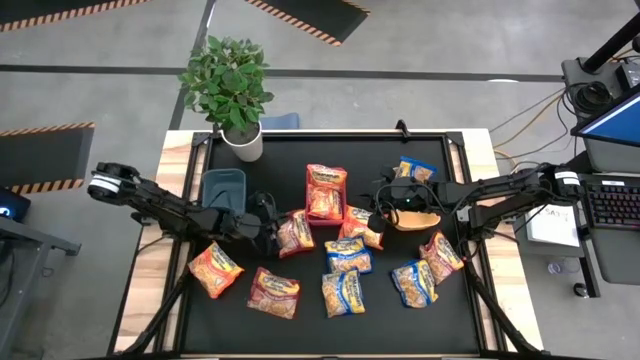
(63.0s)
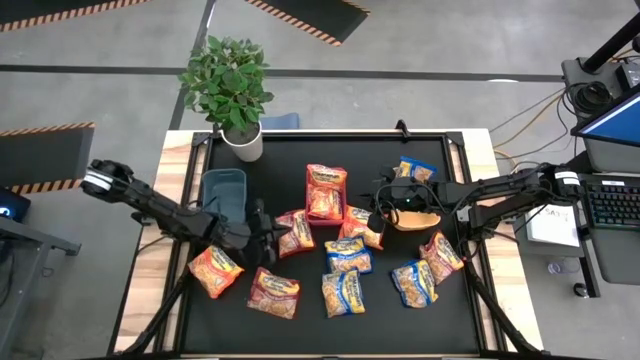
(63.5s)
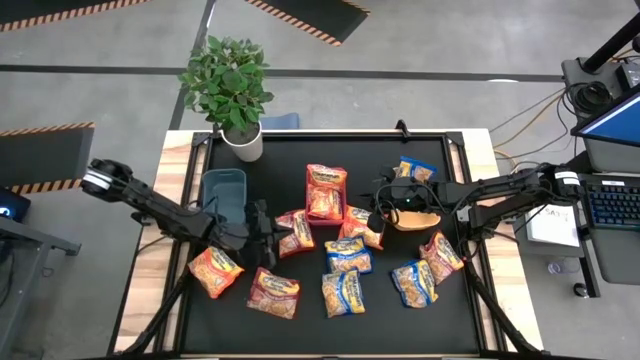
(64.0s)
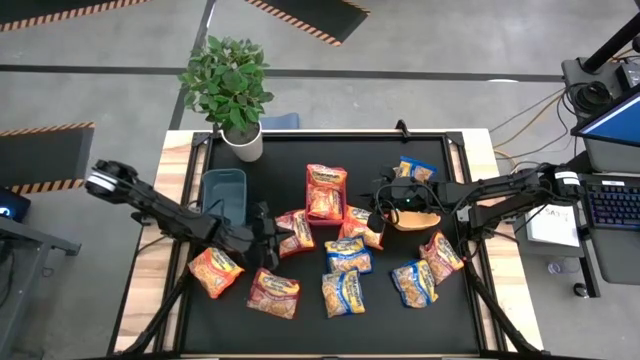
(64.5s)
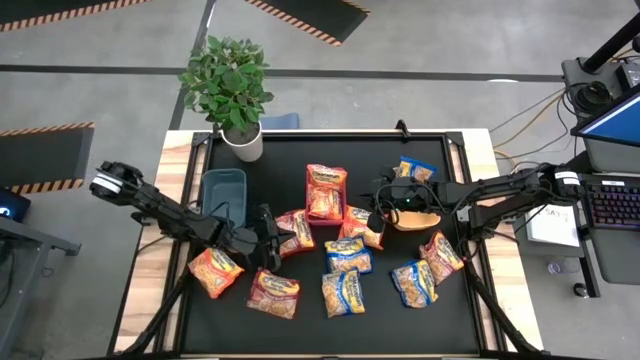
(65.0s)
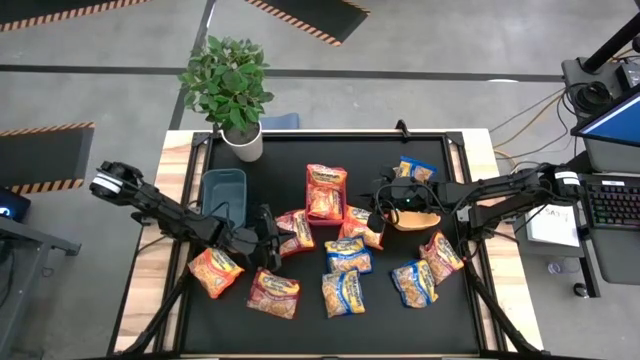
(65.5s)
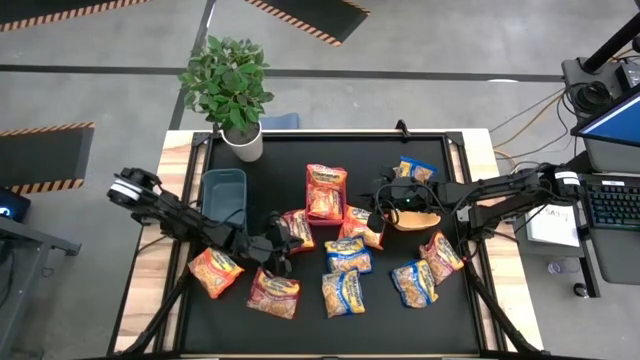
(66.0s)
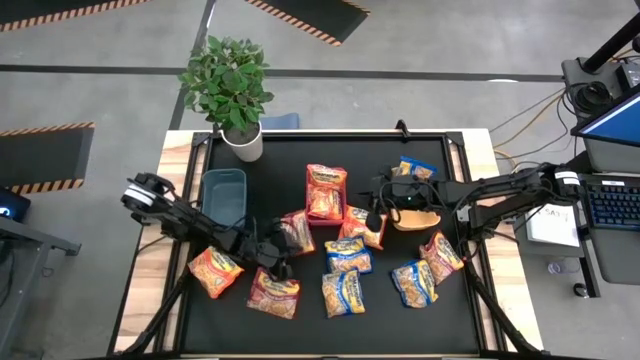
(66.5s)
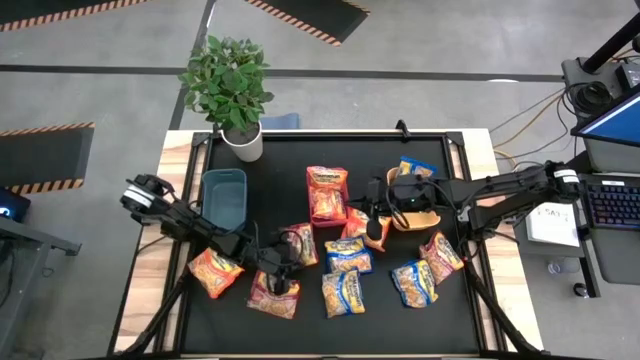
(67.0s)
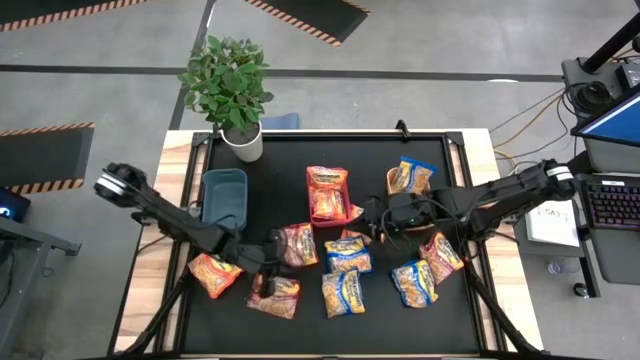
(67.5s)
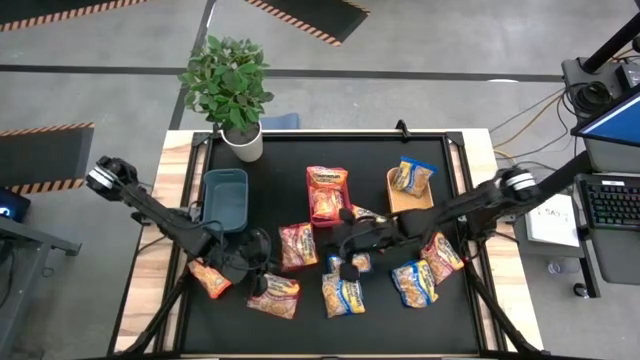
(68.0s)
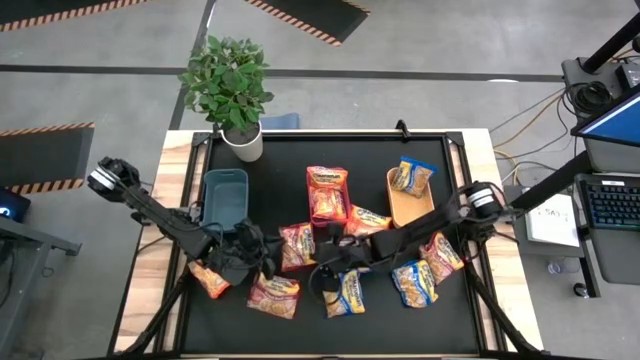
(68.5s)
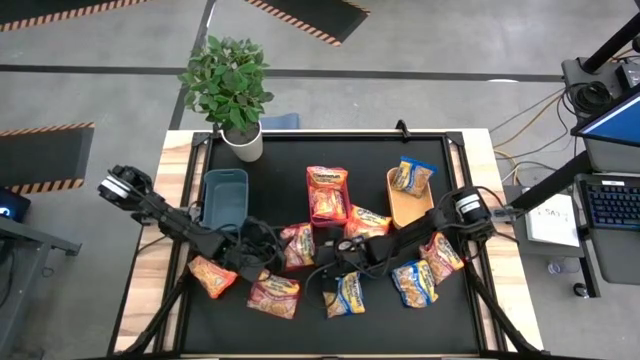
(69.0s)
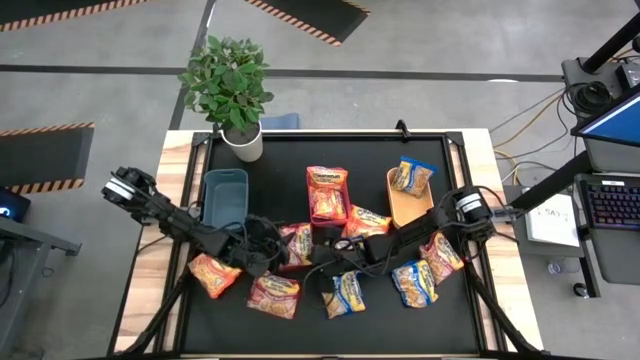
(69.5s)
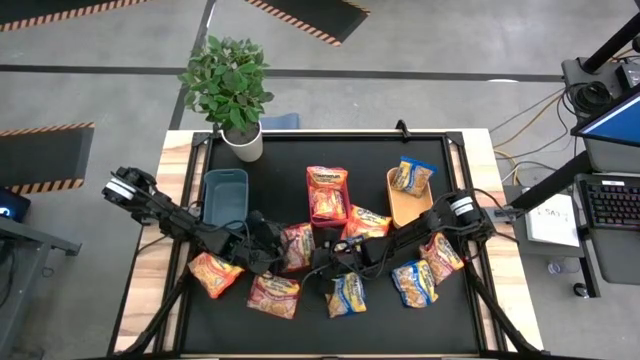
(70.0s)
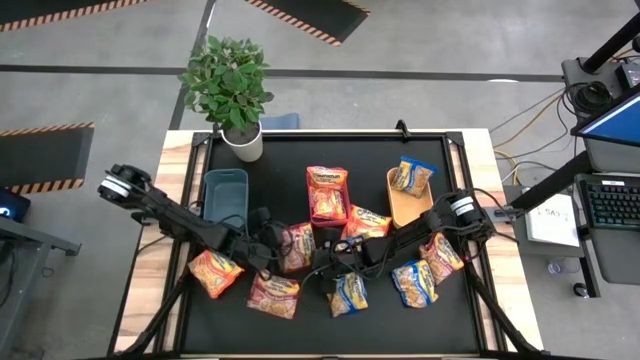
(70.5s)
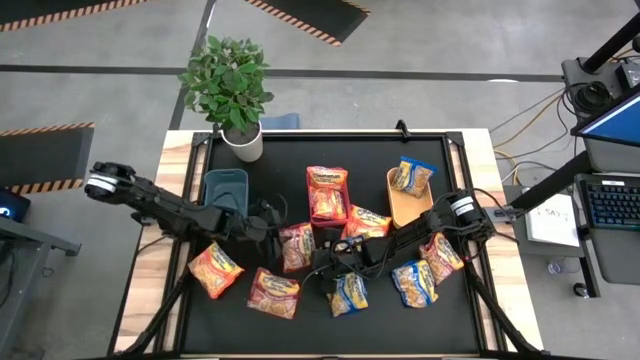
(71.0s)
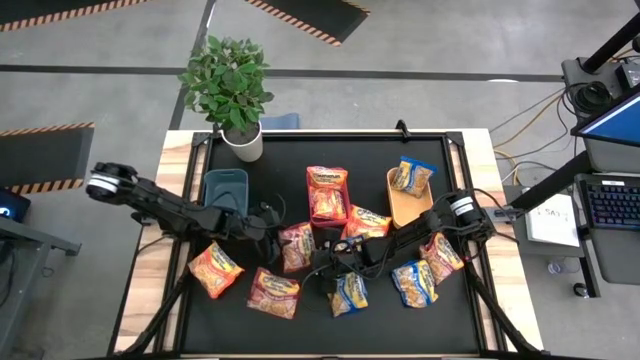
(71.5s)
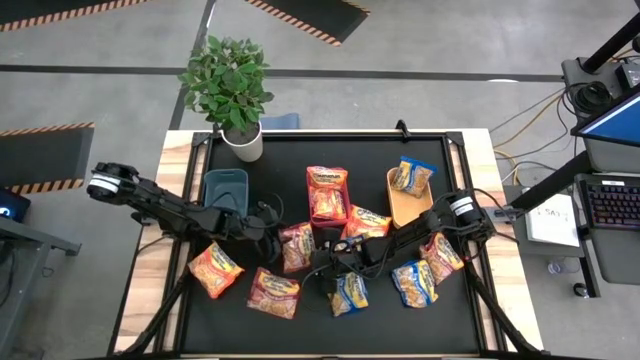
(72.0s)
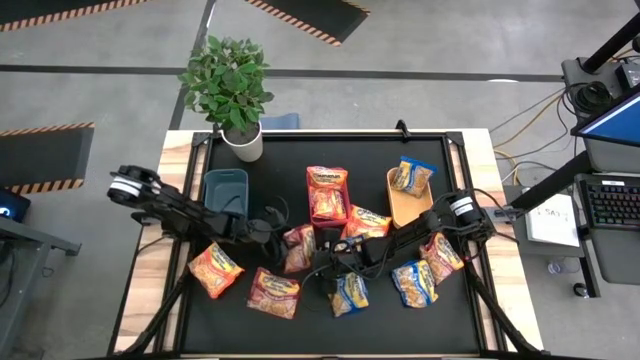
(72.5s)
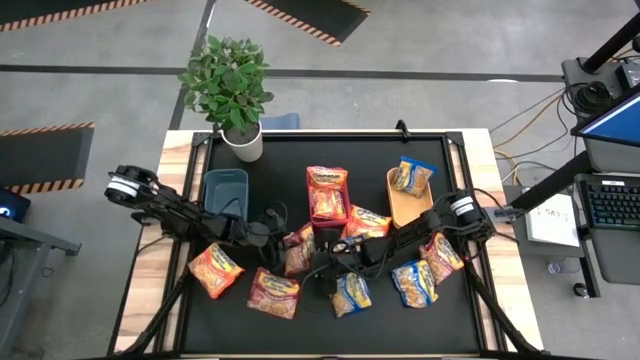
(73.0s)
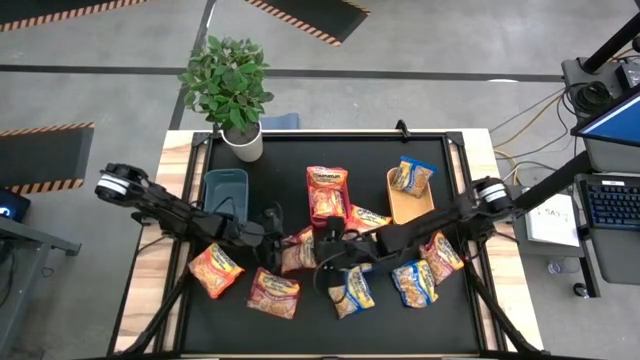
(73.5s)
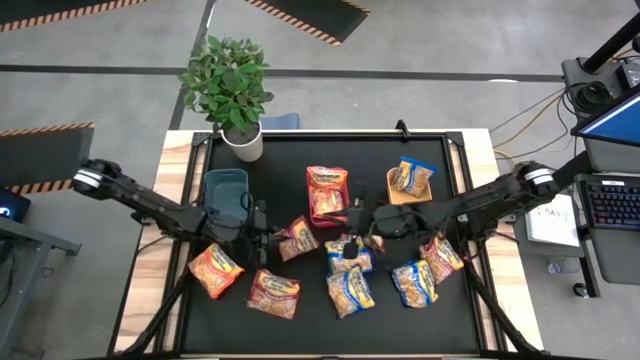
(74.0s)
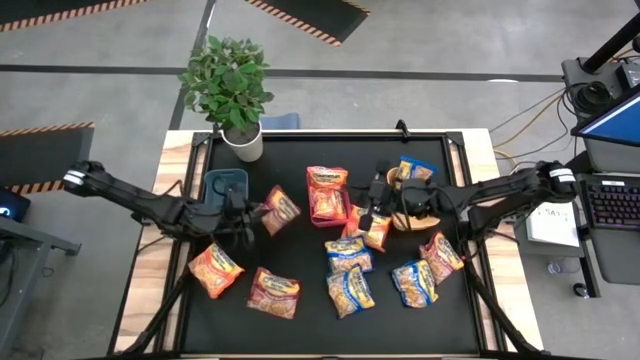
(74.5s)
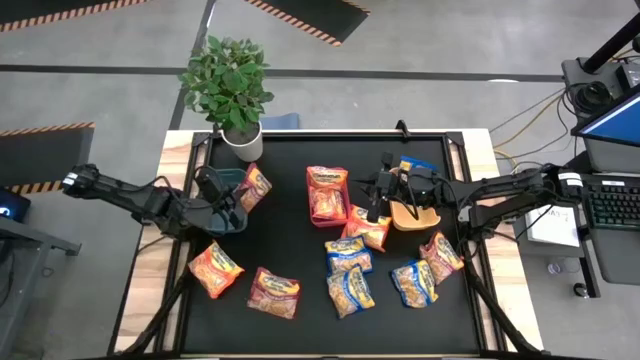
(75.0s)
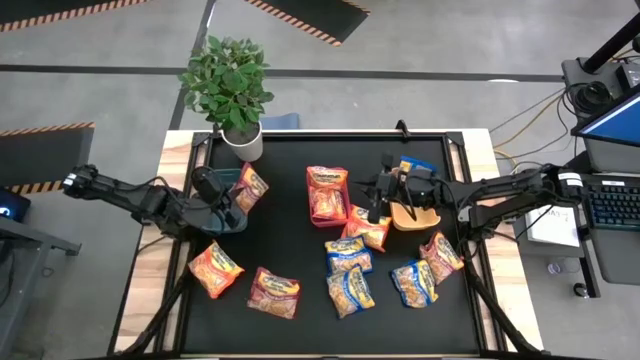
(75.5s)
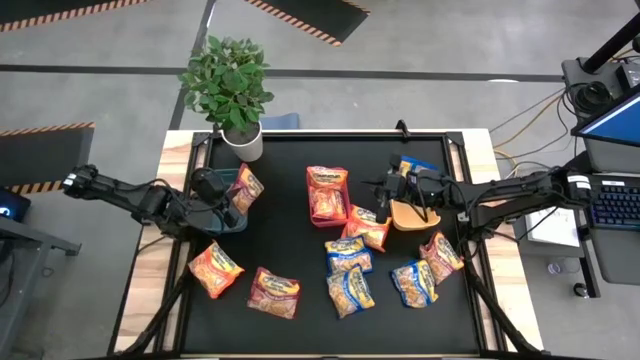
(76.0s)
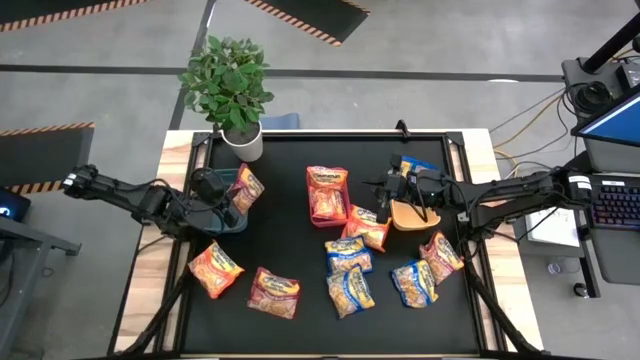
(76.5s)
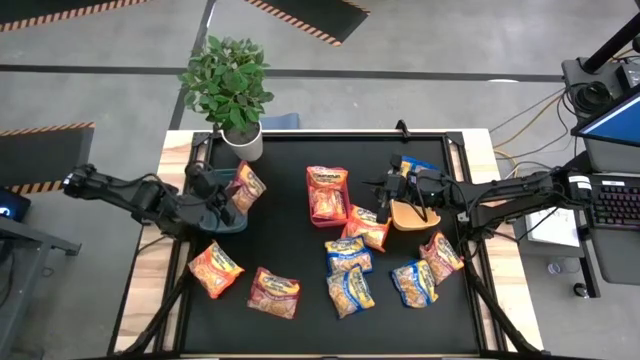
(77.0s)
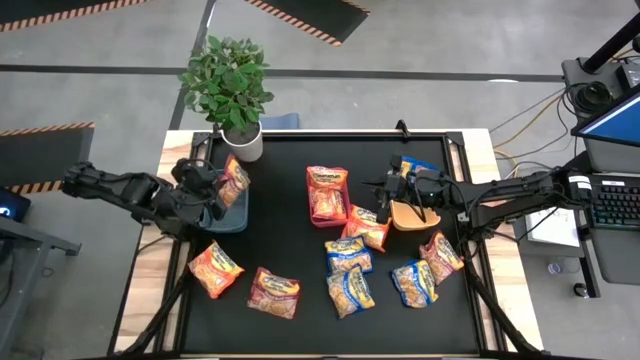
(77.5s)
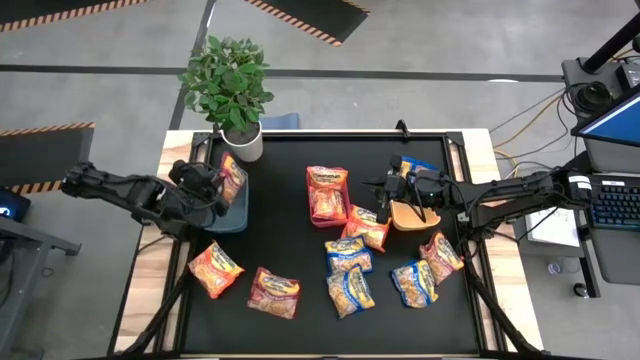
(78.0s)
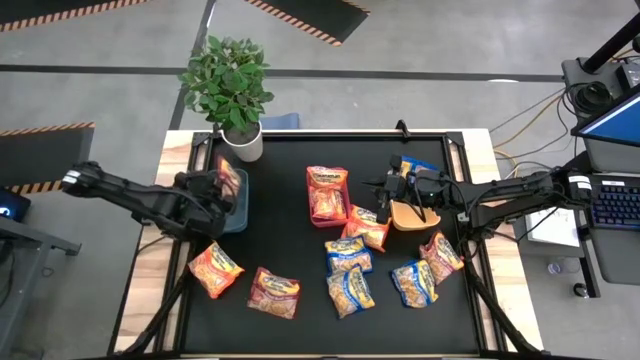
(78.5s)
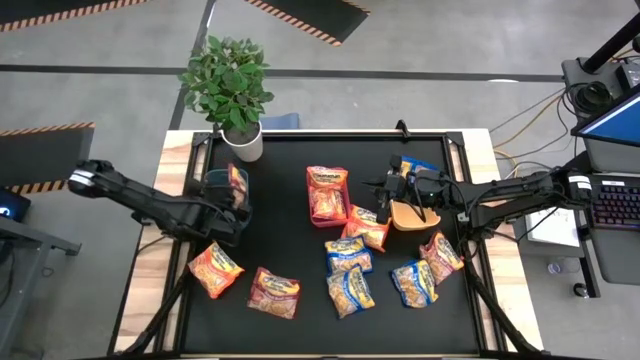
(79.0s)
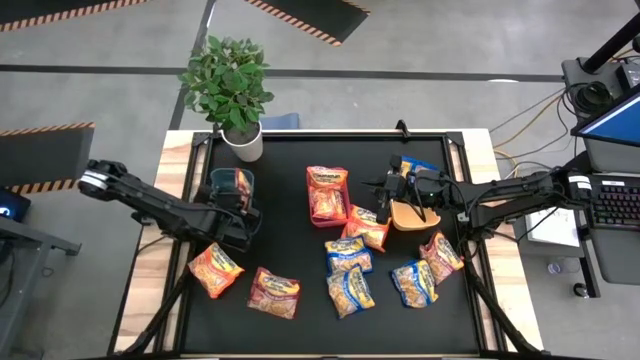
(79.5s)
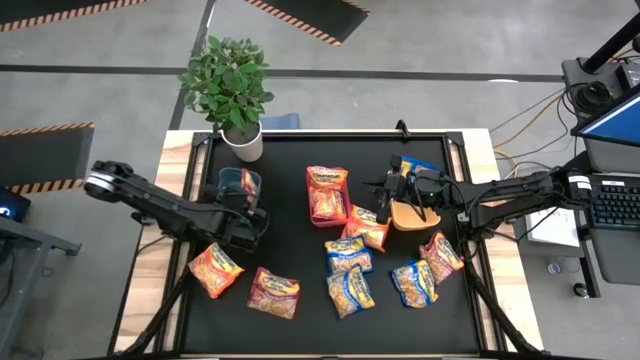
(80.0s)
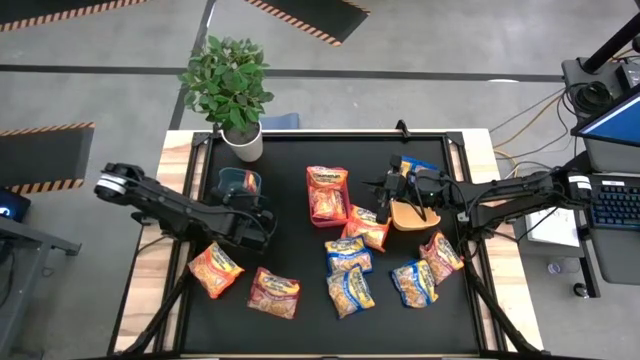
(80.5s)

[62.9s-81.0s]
Task: Sort Maruchan noodles
Put the red noodle pack into the blue bin

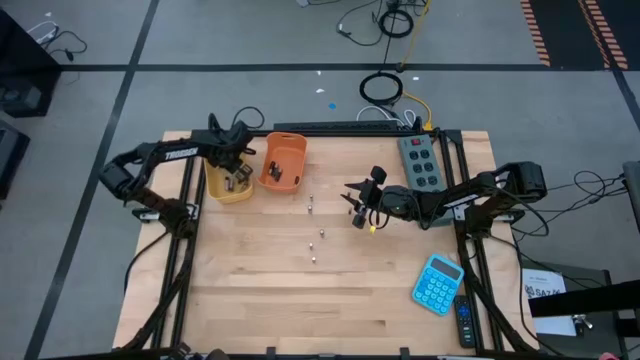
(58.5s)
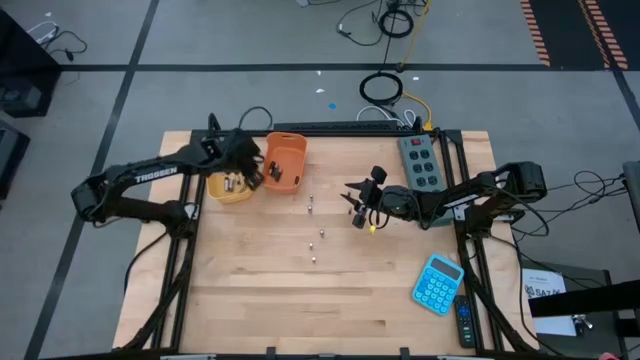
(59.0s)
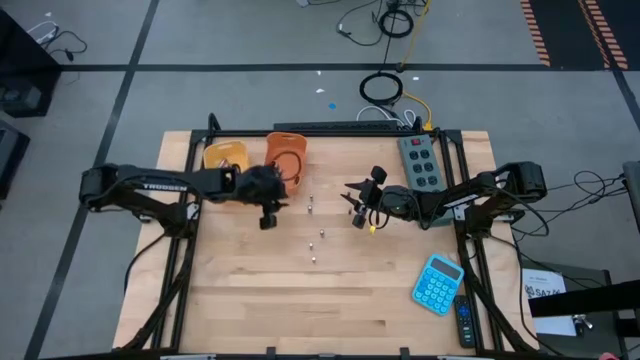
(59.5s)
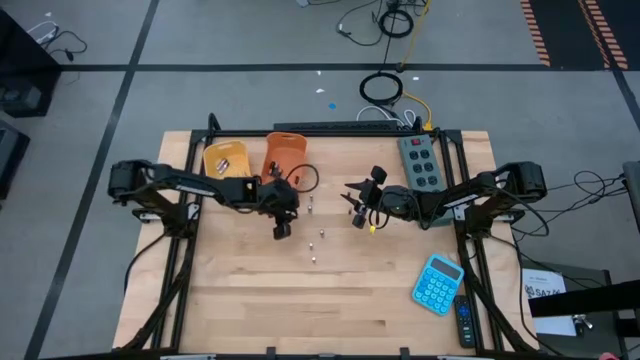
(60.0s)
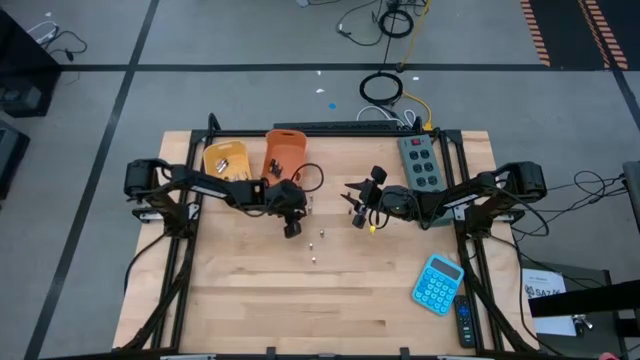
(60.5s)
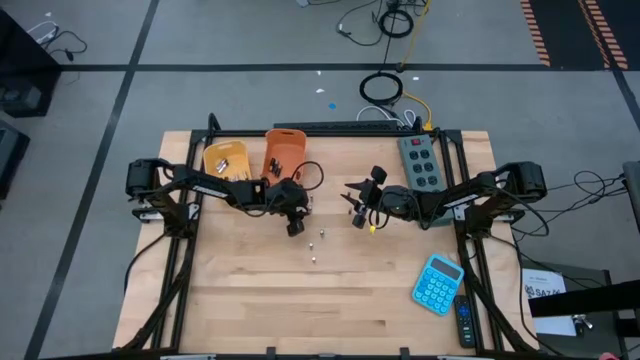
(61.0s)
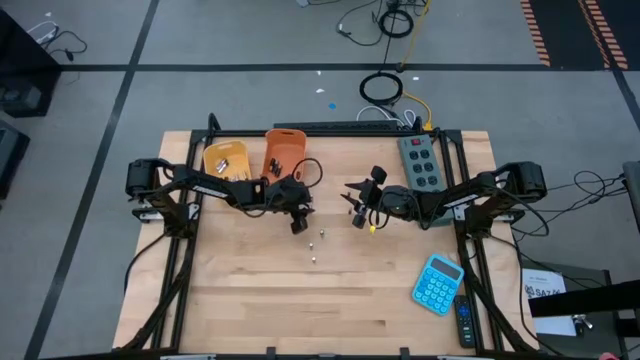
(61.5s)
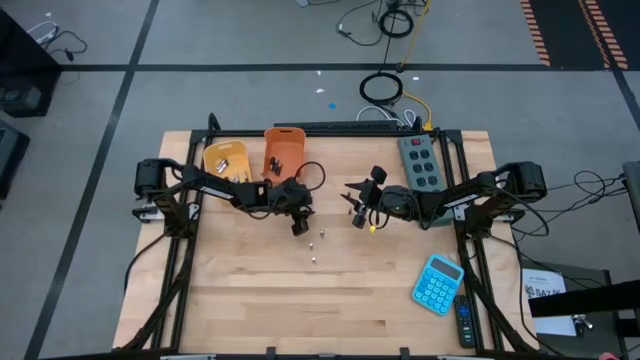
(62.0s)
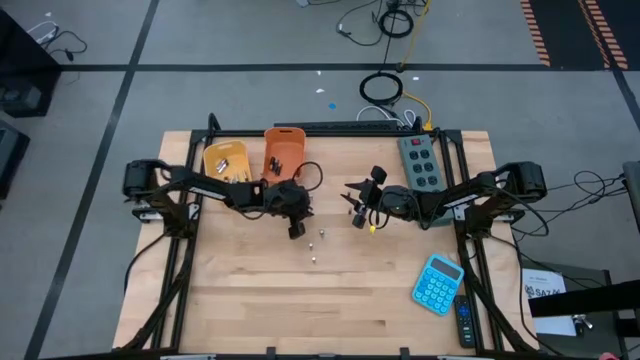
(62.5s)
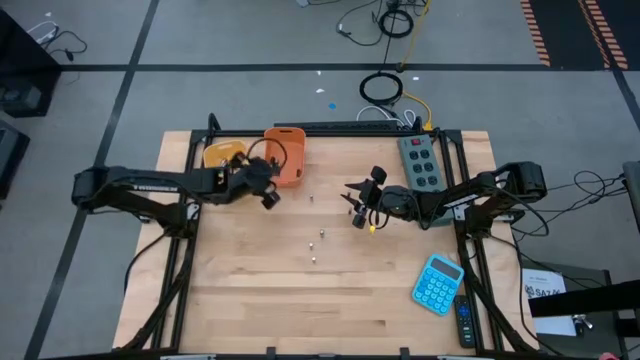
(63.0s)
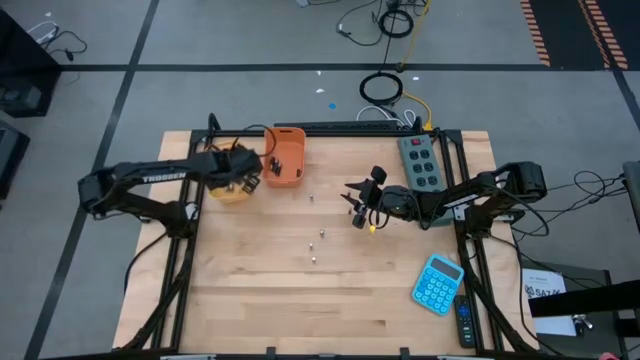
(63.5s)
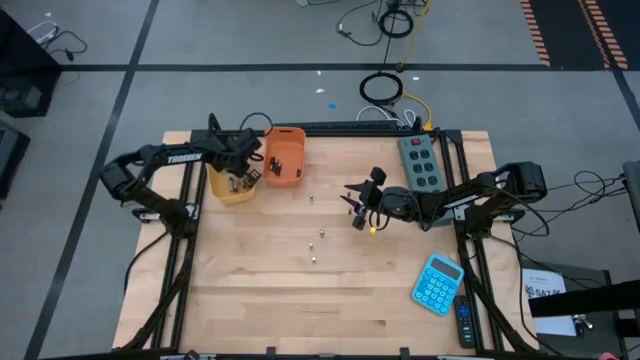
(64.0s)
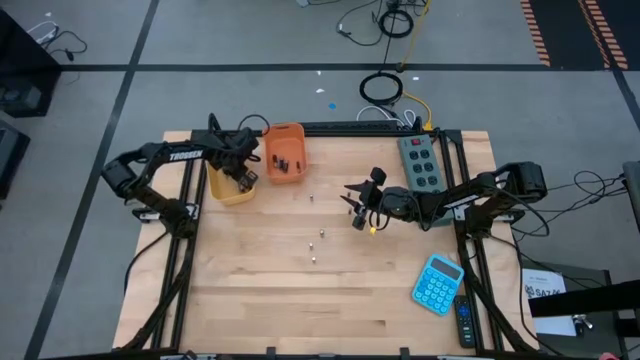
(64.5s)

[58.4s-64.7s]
Task: Sort batteries
Put the silver battery into the yellow bin
